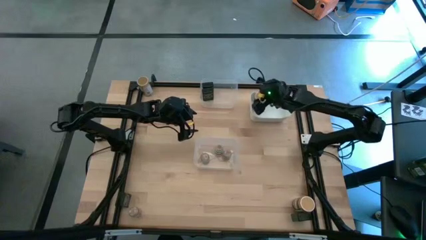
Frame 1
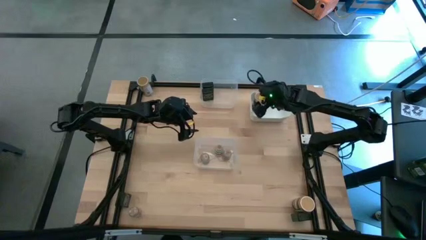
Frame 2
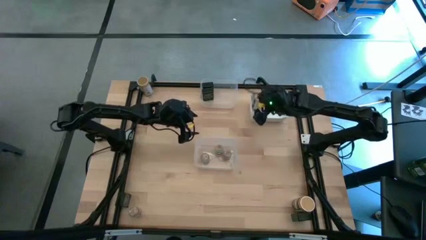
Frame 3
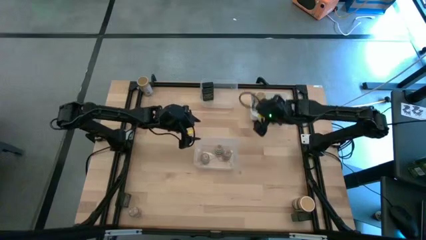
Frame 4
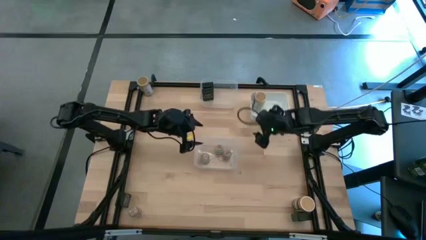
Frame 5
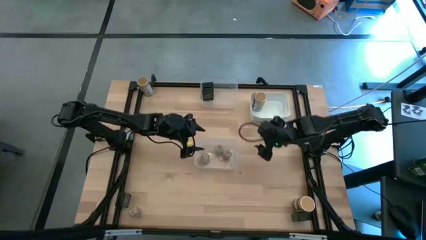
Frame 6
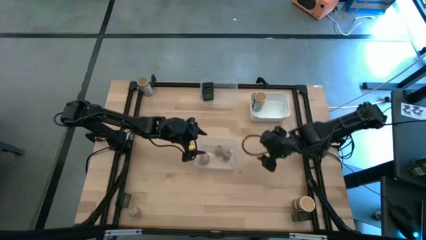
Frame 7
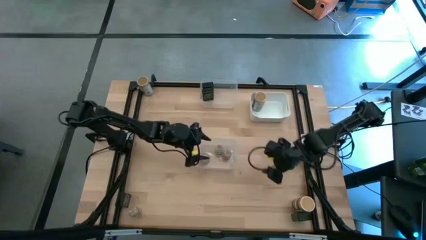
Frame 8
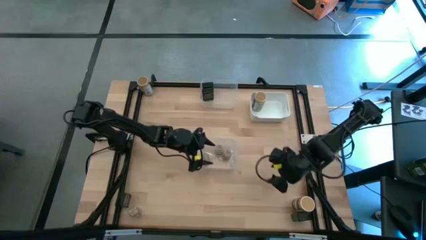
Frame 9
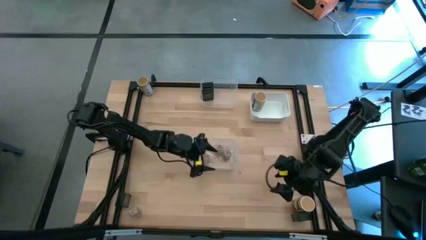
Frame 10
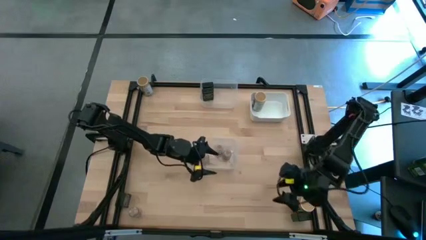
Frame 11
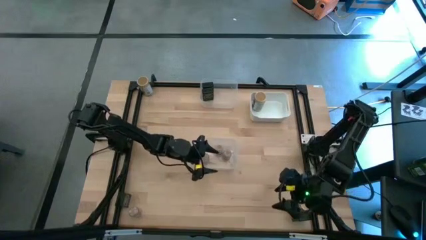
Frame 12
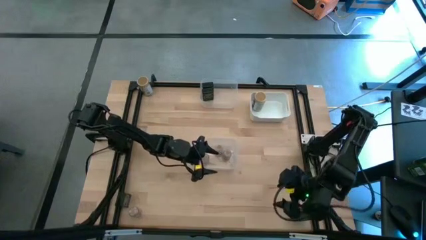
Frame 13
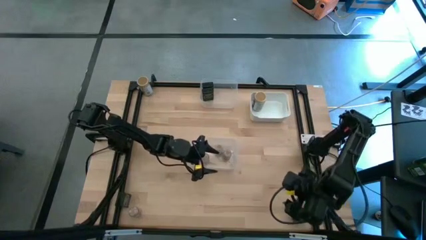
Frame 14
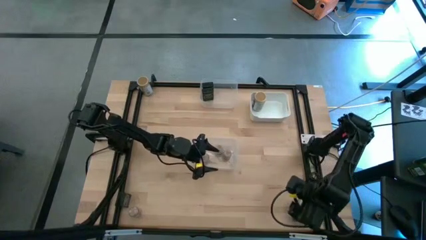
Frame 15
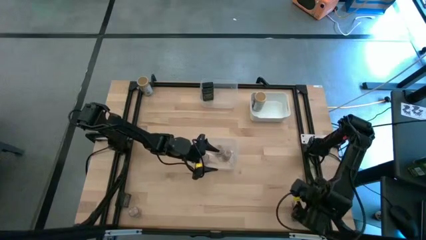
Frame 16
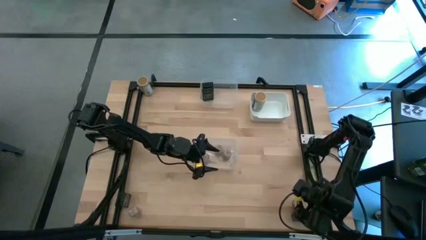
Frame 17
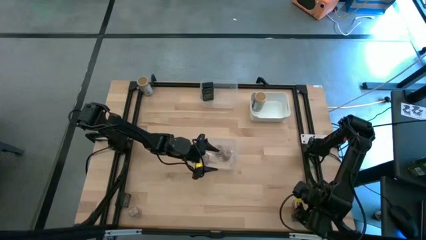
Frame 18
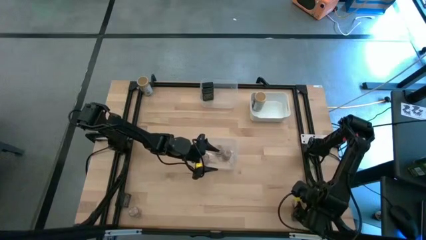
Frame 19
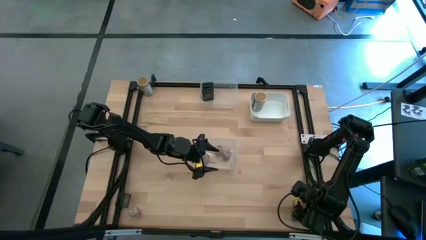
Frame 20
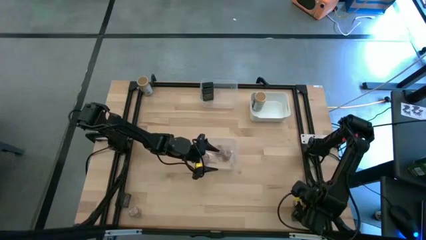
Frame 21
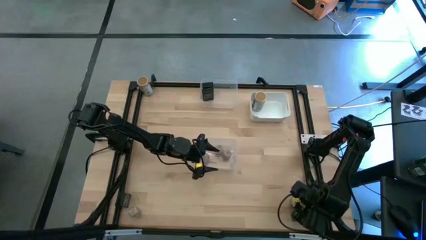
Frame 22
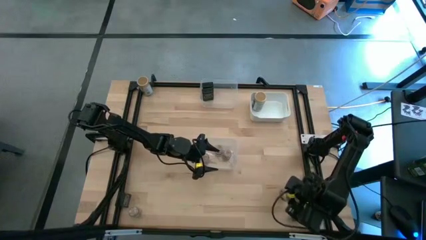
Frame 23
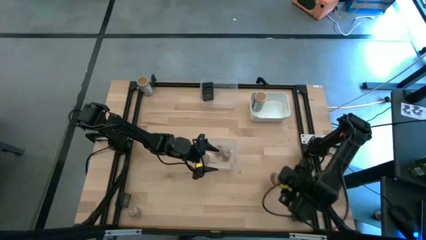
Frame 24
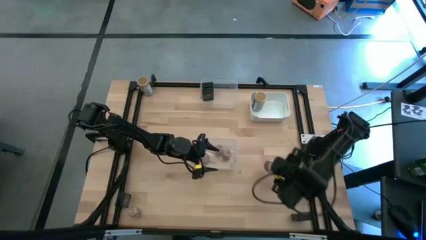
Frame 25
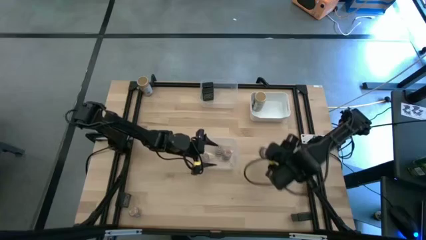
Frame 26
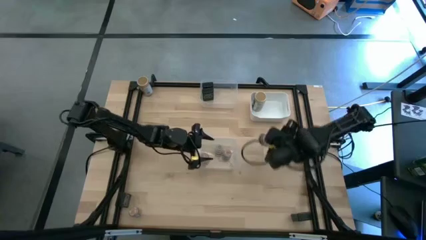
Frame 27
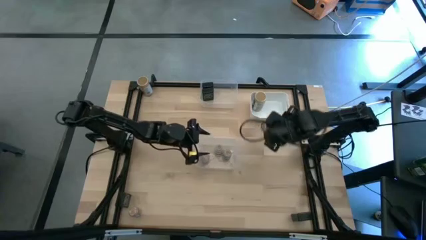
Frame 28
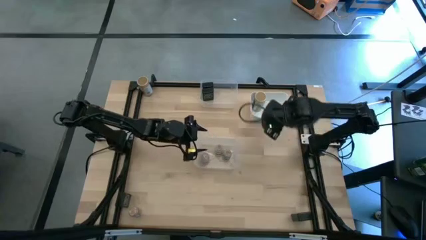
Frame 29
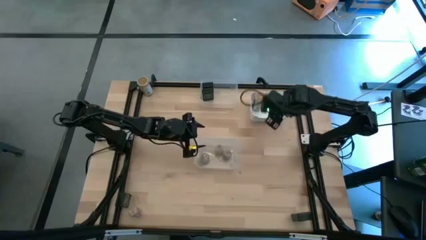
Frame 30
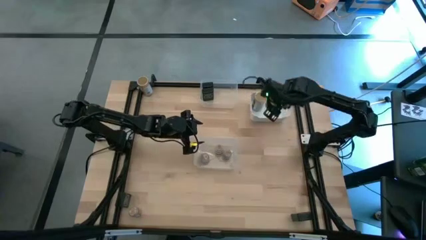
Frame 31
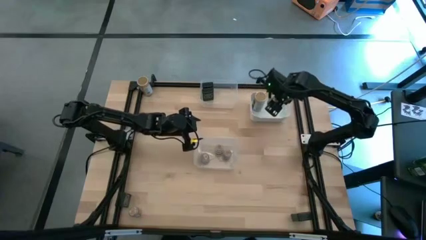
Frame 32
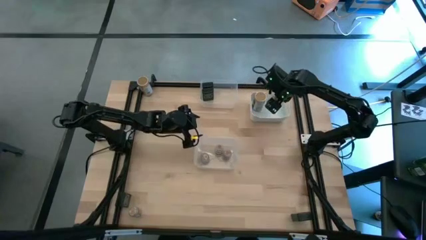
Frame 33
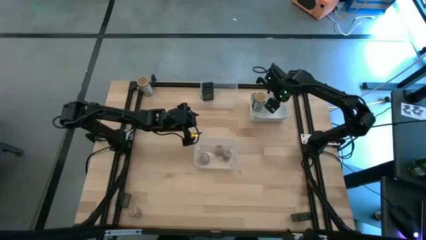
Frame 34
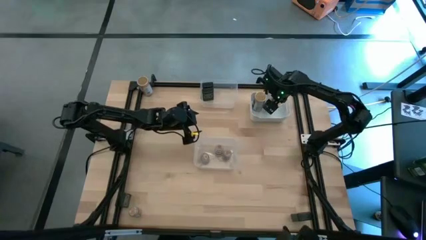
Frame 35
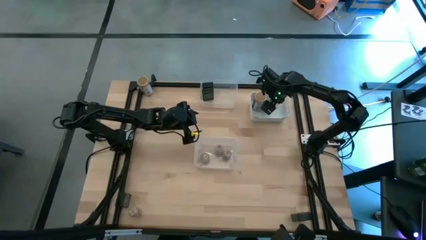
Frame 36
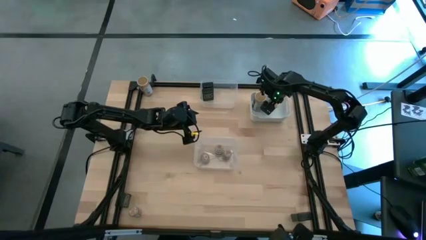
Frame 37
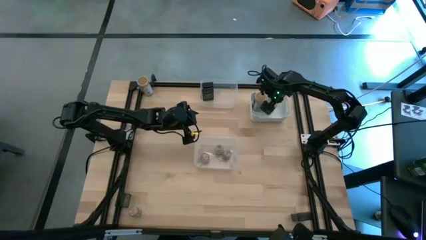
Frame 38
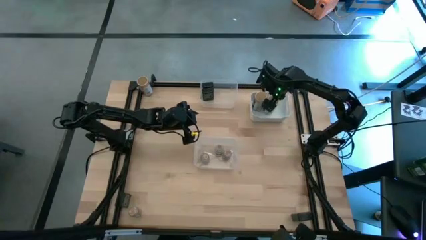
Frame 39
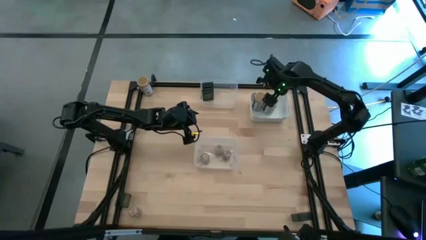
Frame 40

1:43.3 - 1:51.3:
Task: Sort spices by type
Put the bottom brown seasoning bottle into the white bin

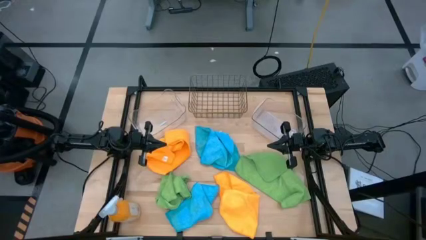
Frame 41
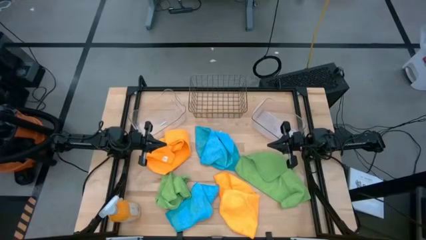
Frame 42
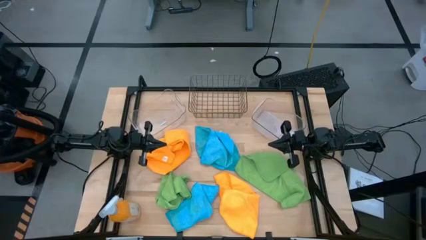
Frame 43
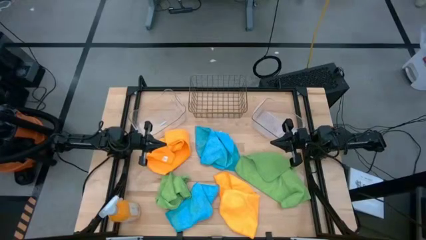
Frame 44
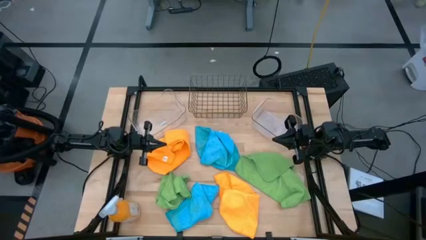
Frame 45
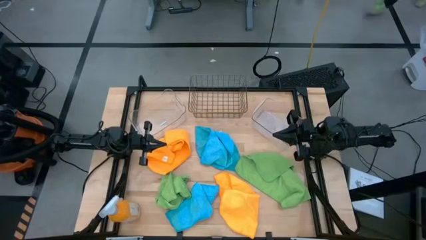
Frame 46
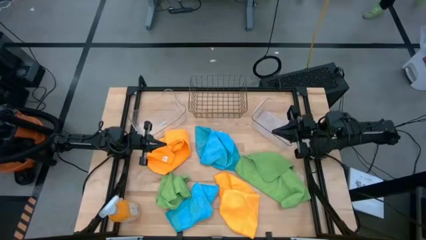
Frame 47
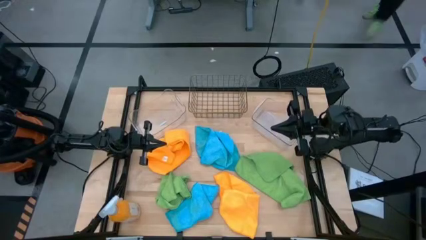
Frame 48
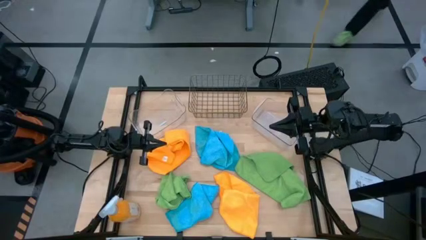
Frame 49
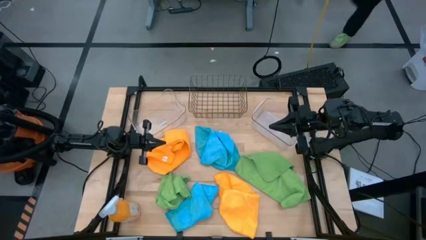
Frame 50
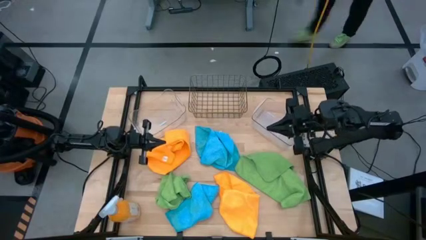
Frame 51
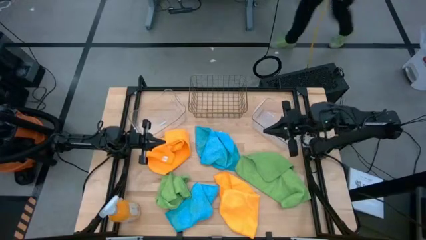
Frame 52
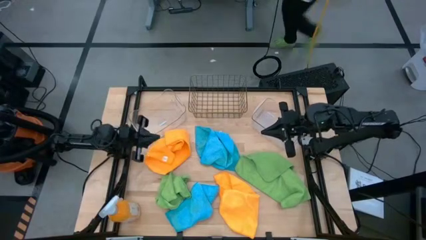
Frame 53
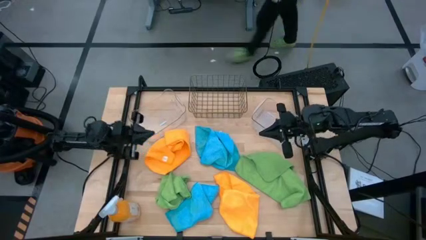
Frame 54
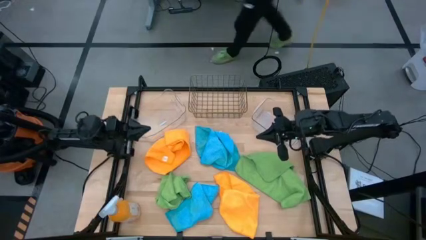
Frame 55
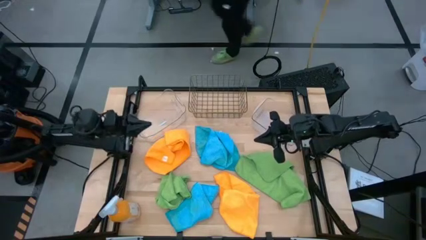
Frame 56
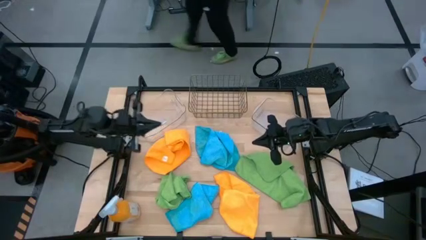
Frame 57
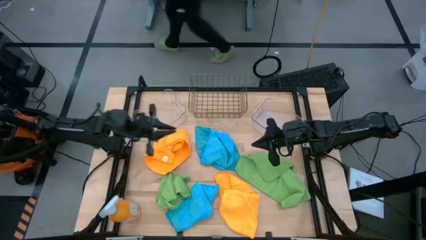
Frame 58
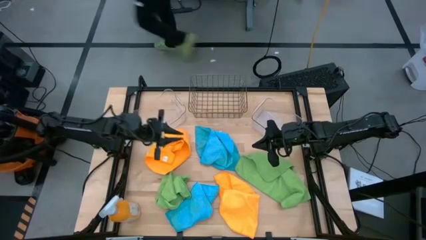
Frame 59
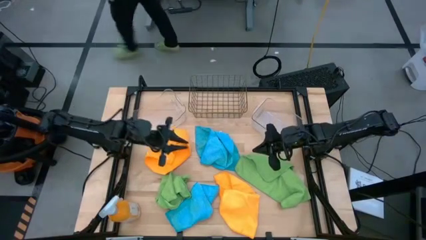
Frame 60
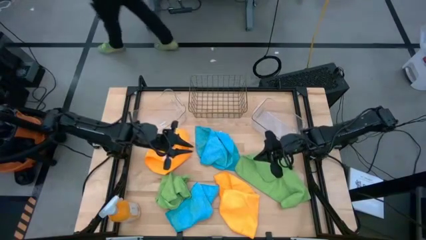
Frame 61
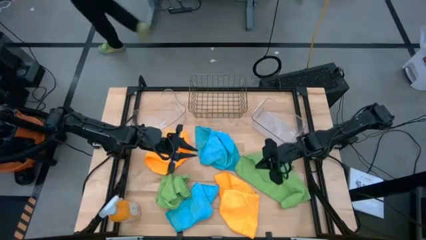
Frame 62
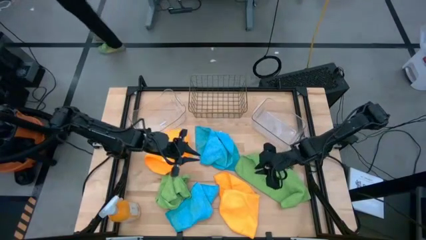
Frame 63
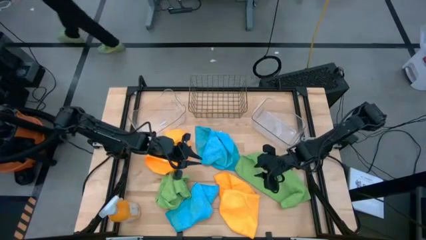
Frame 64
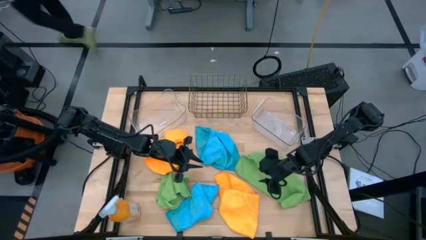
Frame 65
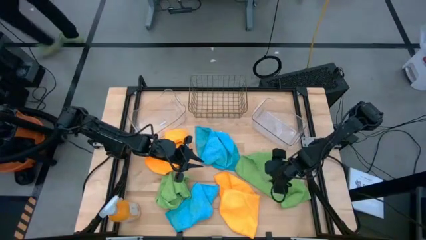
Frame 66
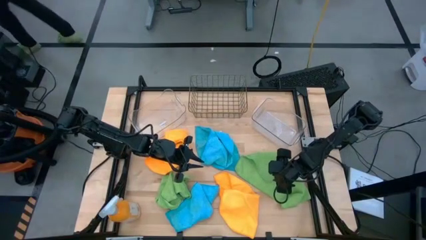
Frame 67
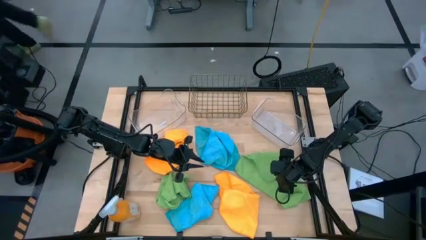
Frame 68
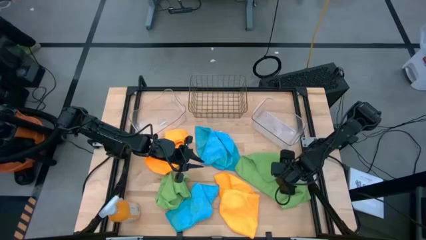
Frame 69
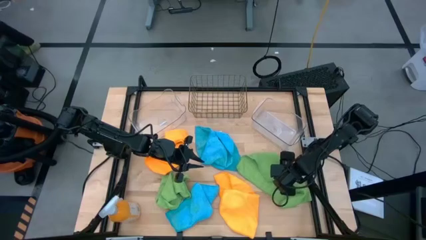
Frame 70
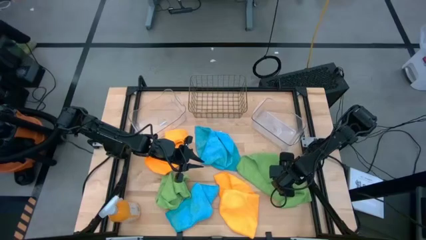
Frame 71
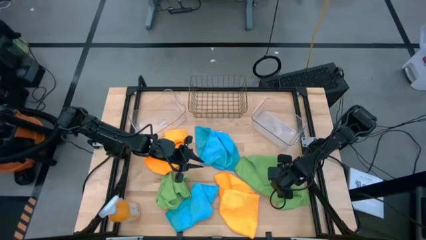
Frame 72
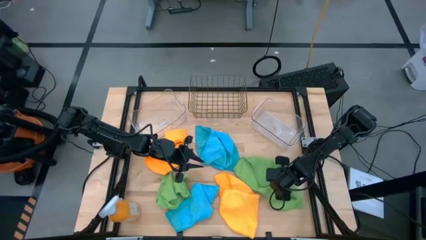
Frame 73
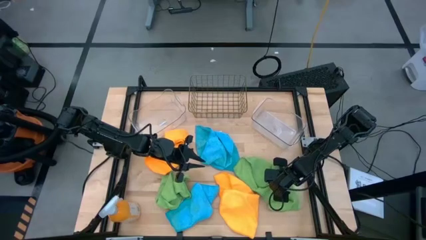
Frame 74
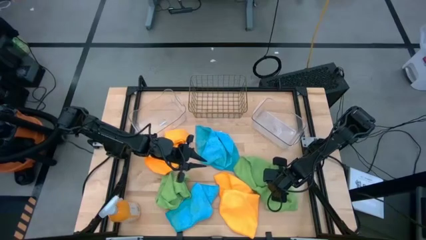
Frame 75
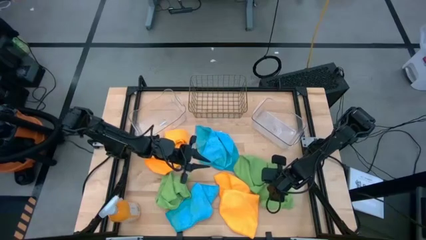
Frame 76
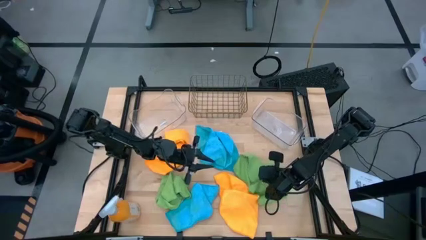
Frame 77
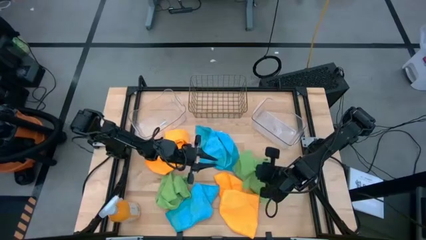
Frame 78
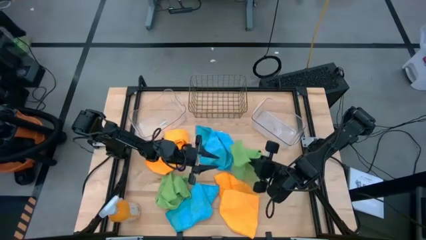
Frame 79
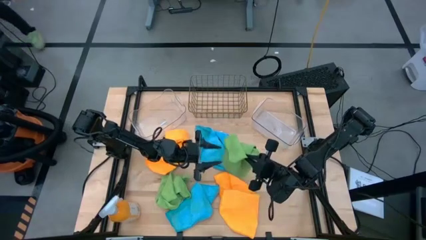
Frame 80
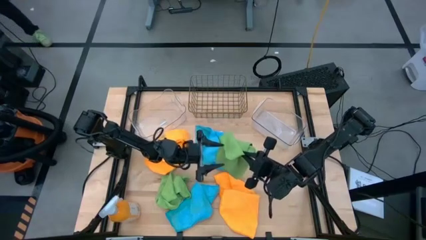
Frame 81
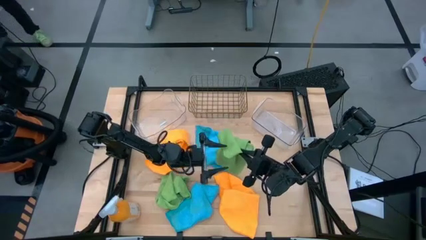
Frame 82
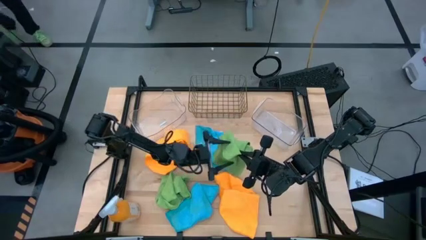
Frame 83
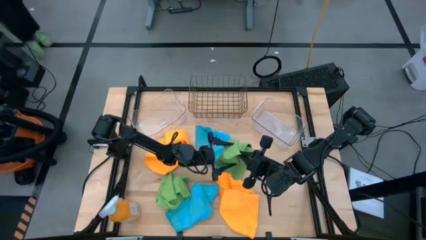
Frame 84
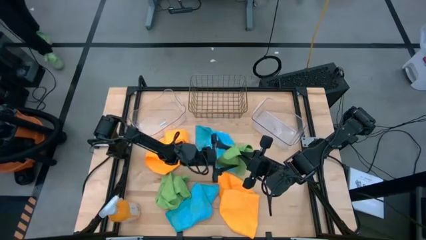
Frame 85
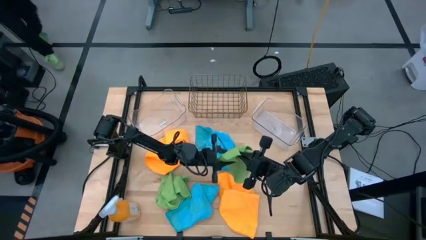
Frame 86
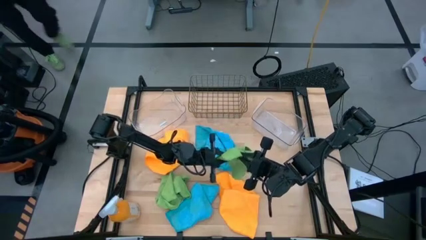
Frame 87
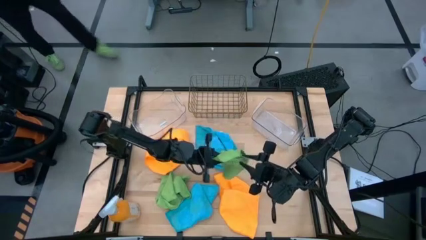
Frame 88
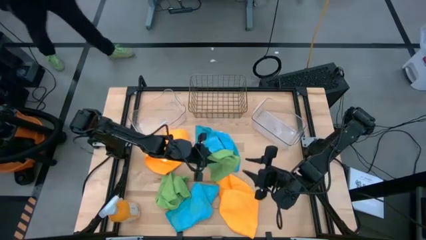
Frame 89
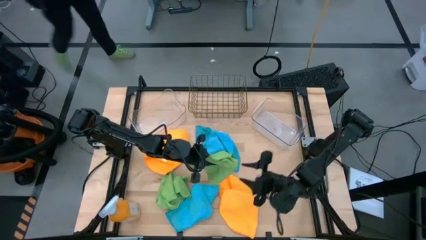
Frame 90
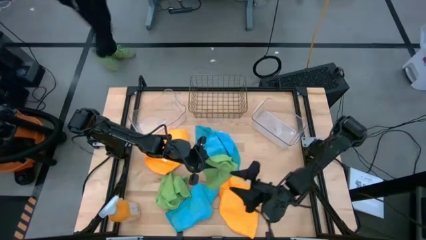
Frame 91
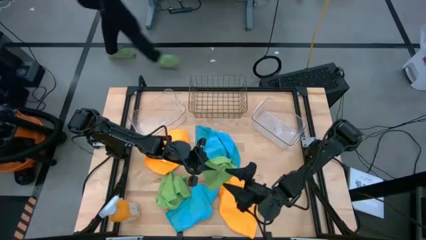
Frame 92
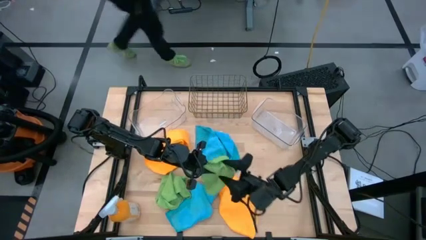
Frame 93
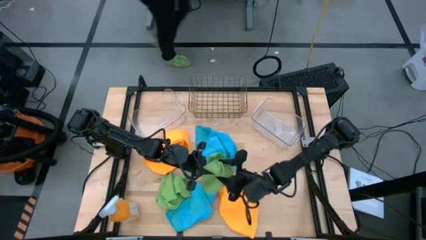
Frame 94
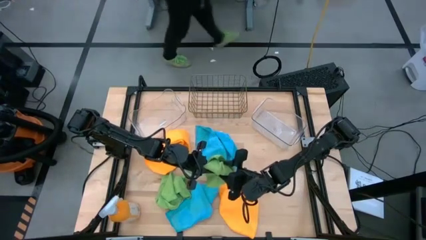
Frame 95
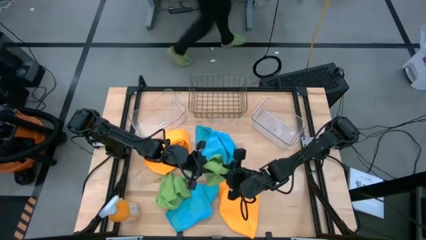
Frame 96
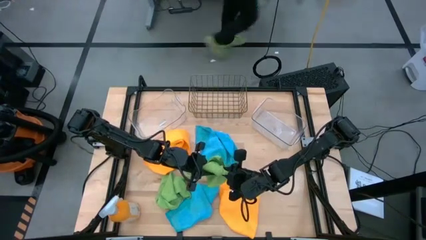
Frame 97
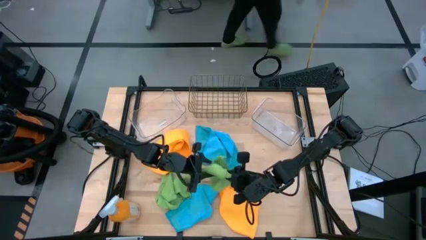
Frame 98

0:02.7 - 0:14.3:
Task: Sort microfiber towel by color & place in baskets
Put the right green towel into the right transparent bin
